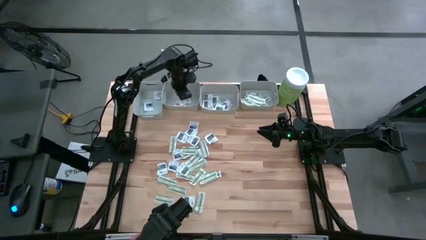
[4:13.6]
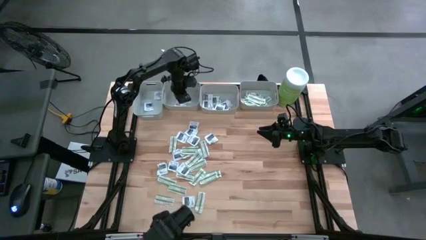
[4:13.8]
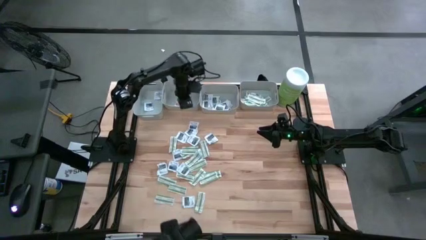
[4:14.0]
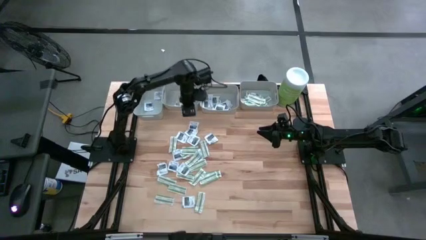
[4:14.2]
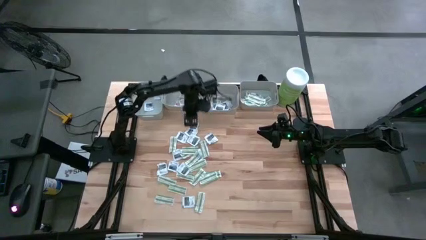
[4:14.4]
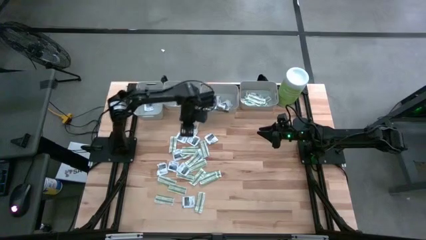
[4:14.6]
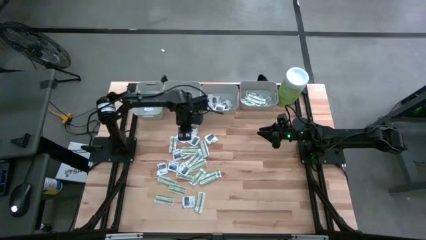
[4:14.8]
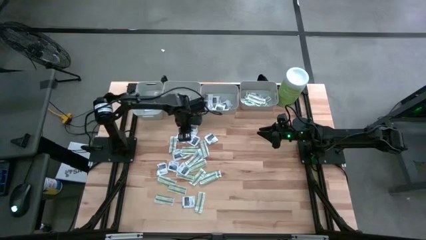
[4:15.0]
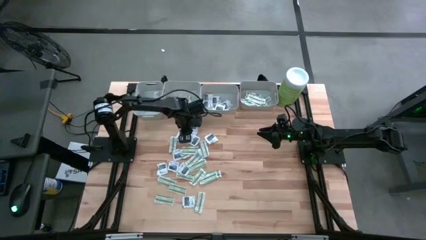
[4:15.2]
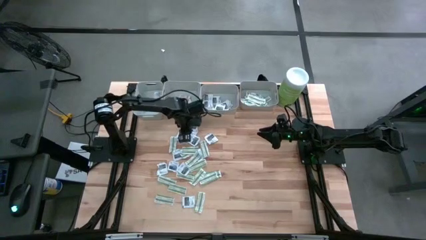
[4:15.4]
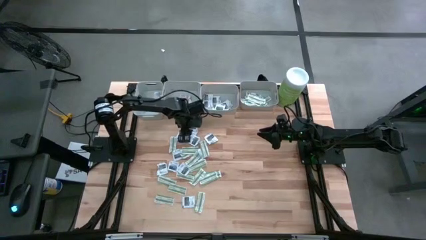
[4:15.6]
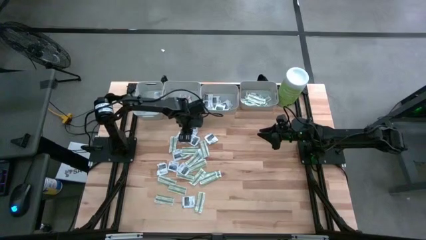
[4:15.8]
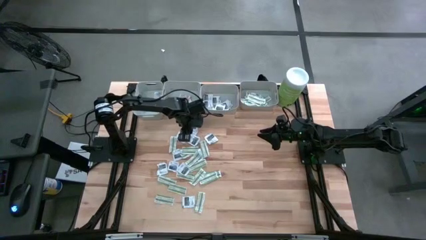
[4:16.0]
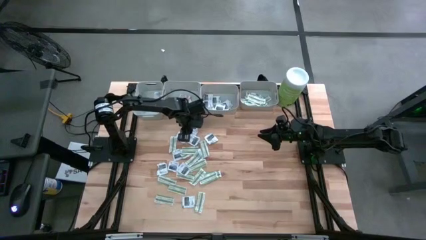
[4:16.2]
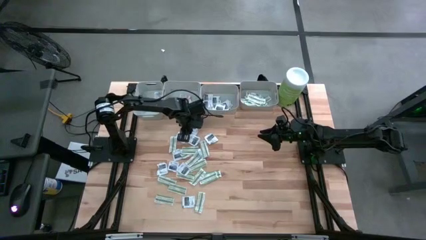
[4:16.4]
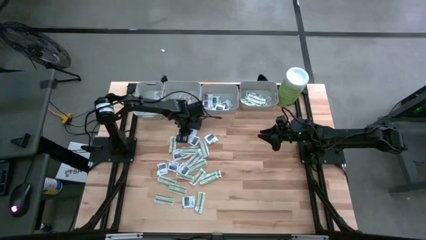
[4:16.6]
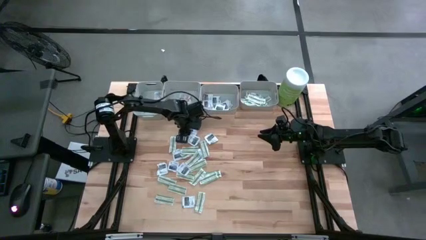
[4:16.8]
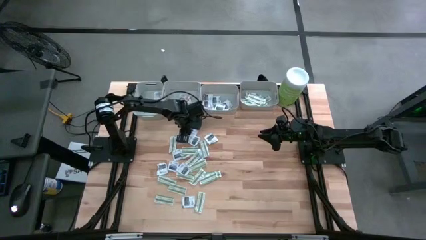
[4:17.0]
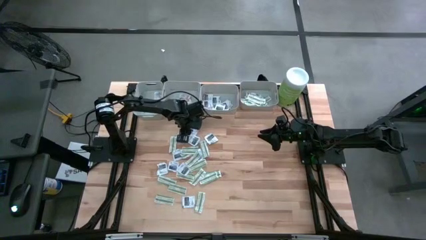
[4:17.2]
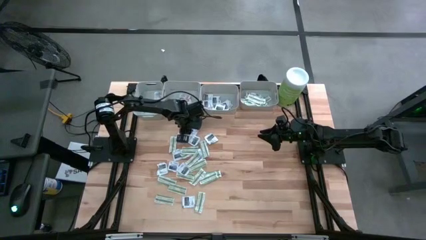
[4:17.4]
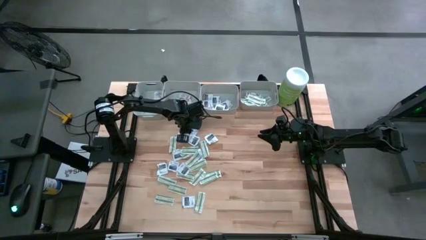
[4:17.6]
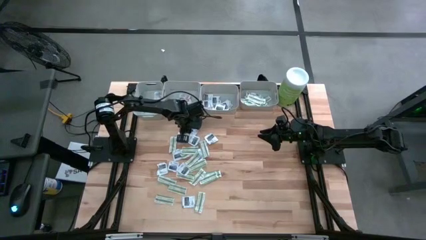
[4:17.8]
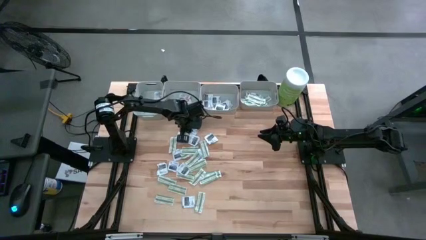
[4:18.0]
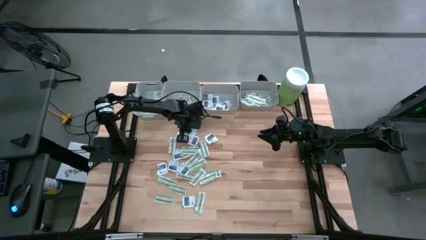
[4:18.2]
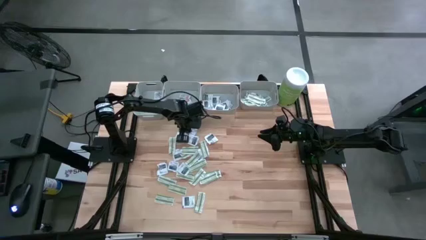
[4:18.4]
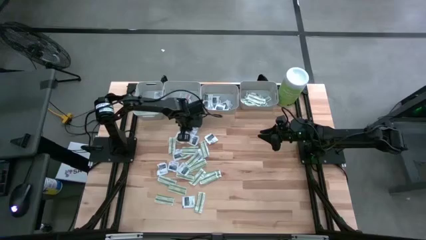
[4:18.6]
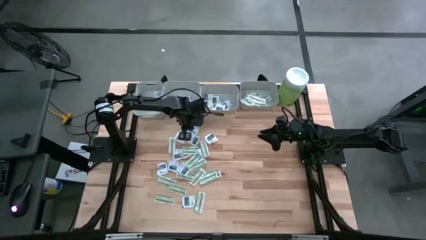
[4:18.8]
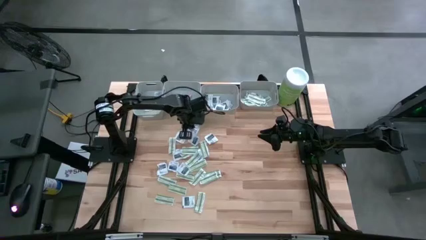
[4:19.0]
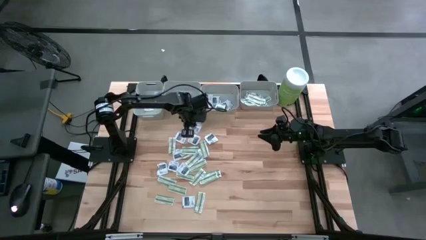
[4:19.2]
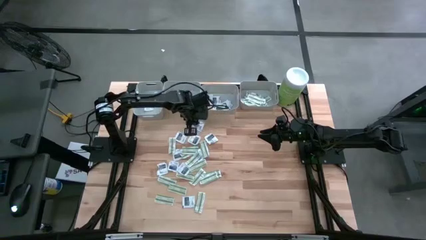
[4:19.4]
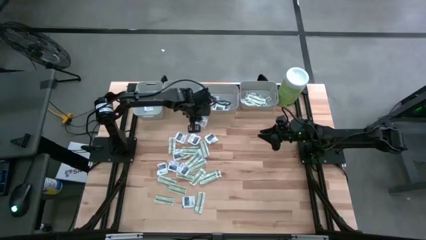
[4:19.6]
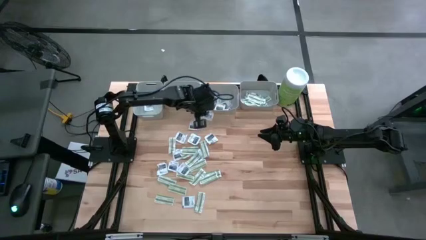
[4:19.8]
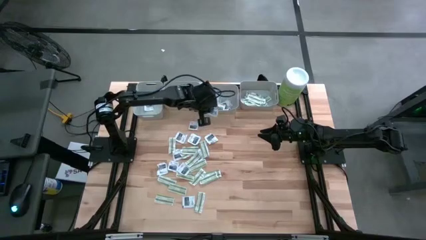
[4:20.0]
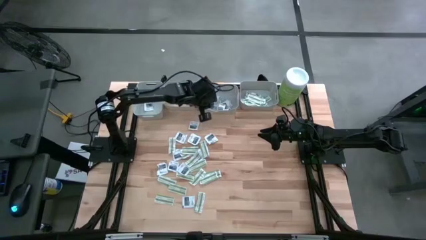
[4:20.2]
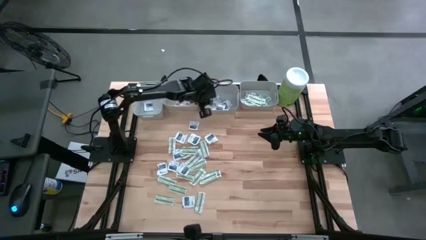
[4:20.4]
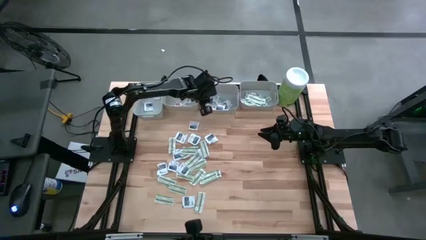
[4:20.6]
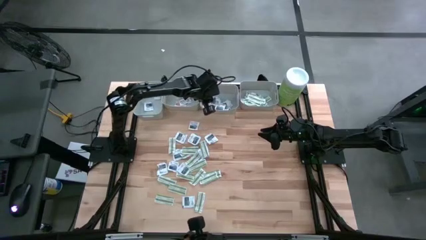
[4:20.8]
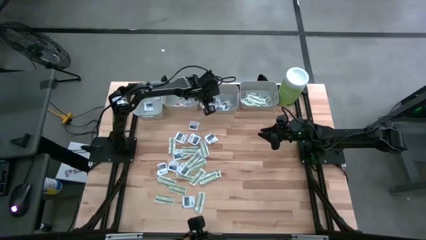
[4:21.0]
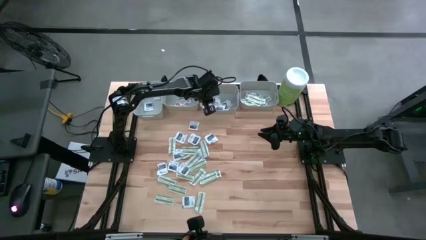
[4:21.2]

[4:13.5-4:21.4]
Task: Pick & Place First Aid Supplies
Put the gray towelette pack into the middle right gray bin

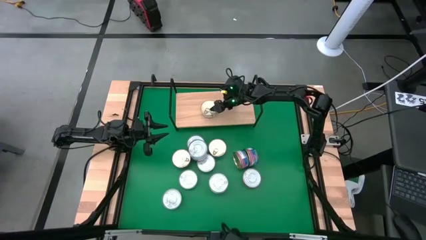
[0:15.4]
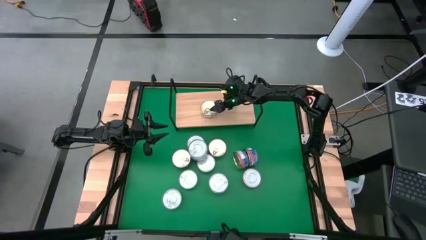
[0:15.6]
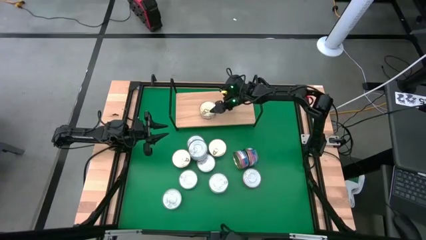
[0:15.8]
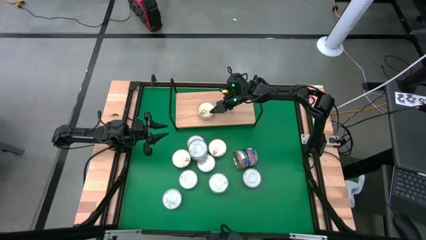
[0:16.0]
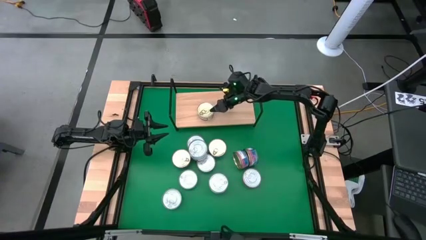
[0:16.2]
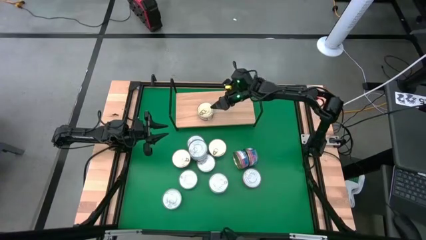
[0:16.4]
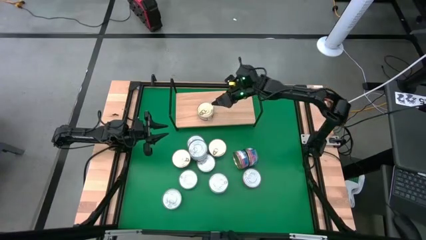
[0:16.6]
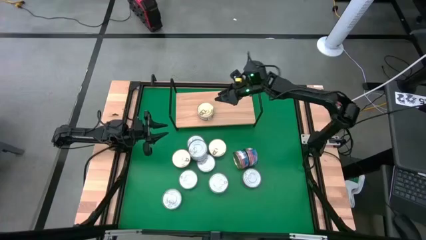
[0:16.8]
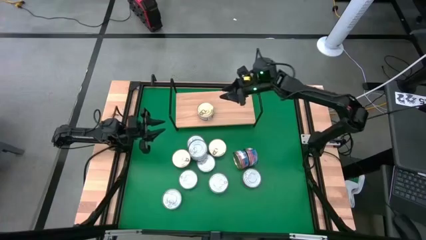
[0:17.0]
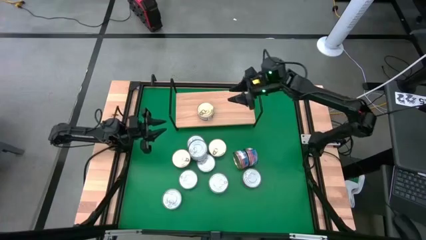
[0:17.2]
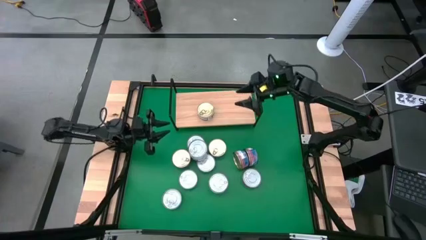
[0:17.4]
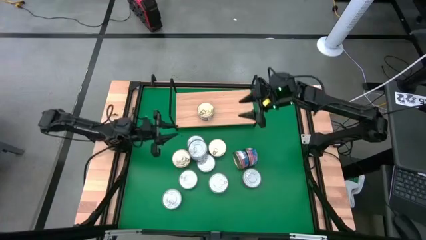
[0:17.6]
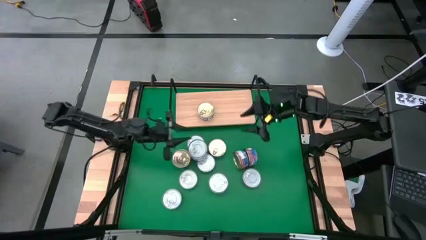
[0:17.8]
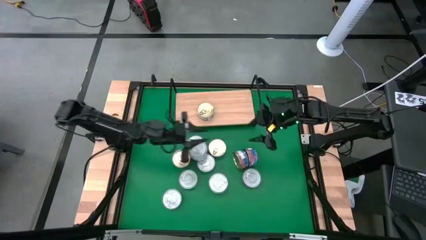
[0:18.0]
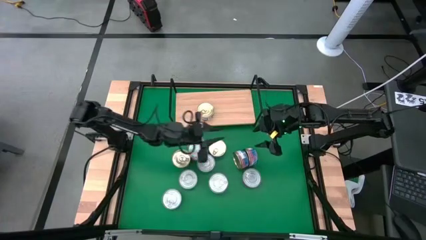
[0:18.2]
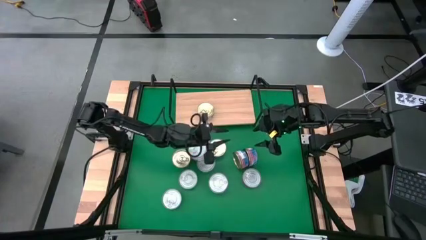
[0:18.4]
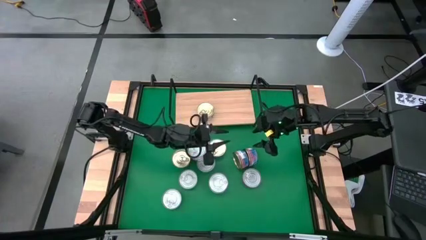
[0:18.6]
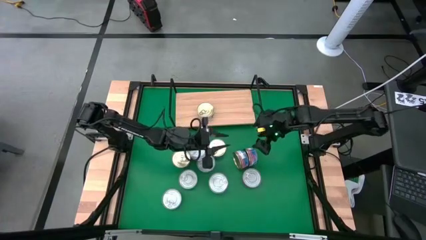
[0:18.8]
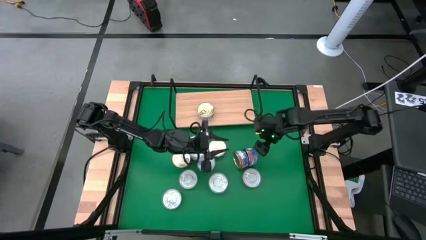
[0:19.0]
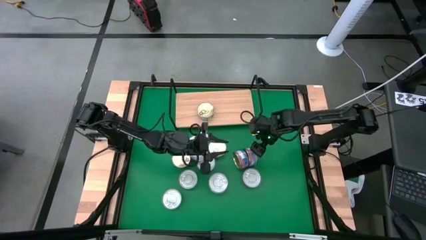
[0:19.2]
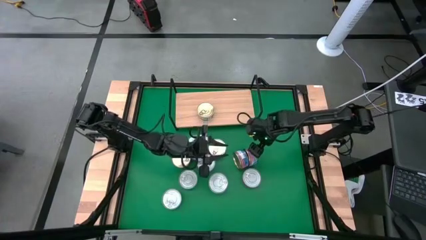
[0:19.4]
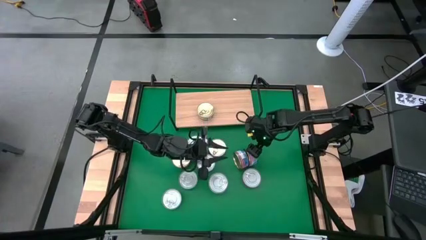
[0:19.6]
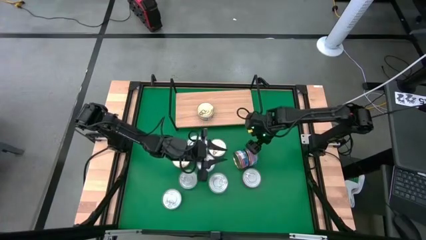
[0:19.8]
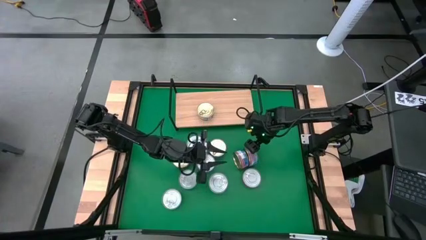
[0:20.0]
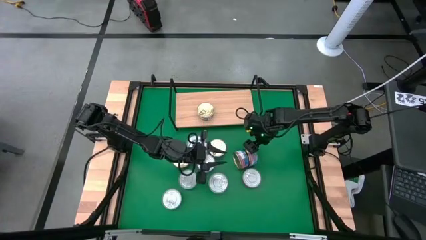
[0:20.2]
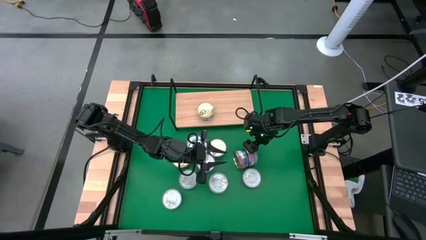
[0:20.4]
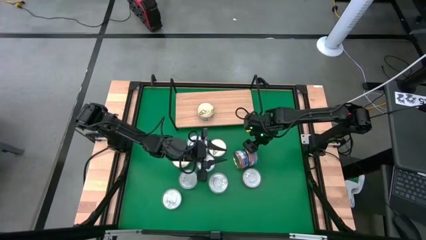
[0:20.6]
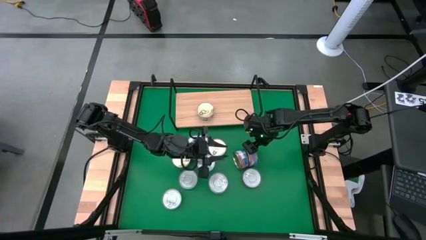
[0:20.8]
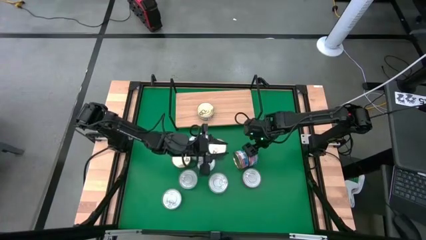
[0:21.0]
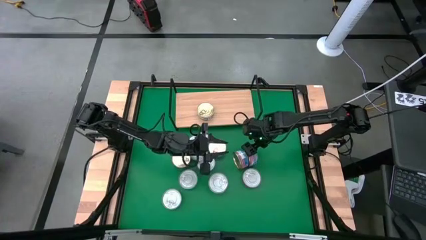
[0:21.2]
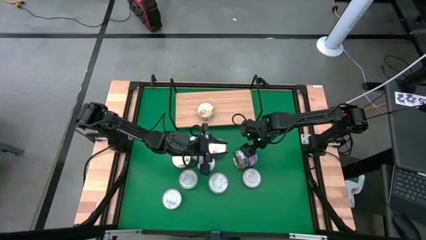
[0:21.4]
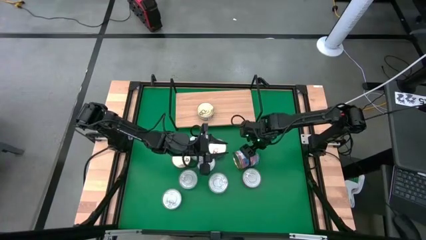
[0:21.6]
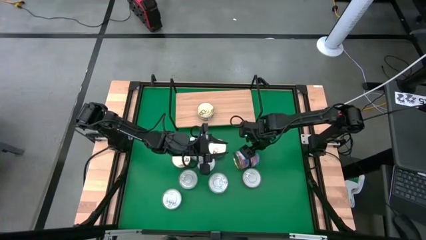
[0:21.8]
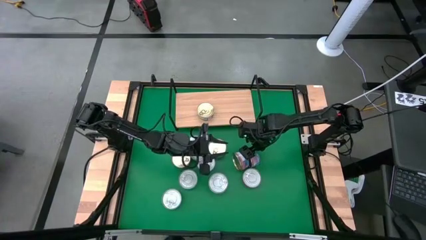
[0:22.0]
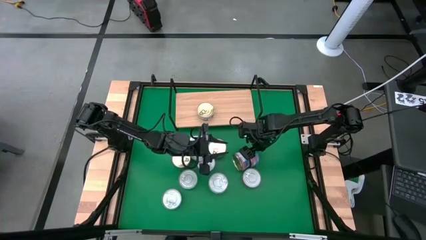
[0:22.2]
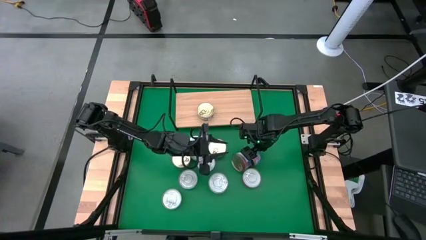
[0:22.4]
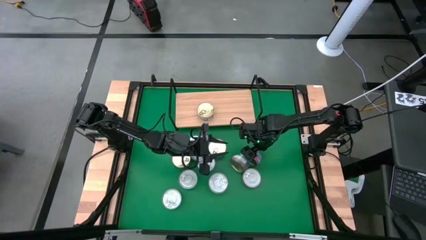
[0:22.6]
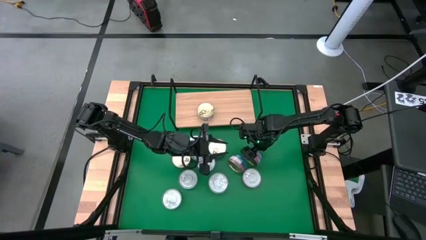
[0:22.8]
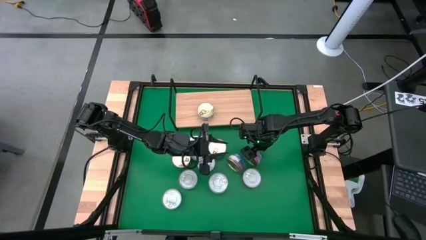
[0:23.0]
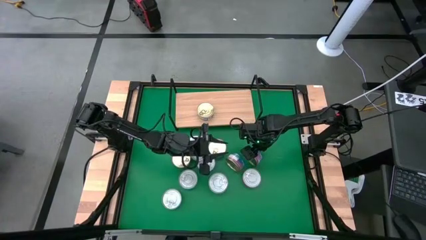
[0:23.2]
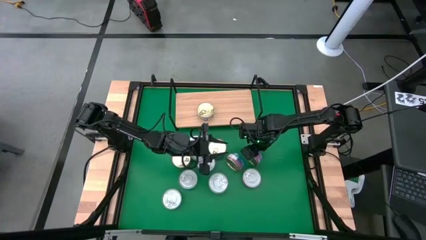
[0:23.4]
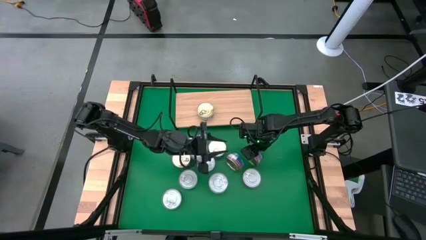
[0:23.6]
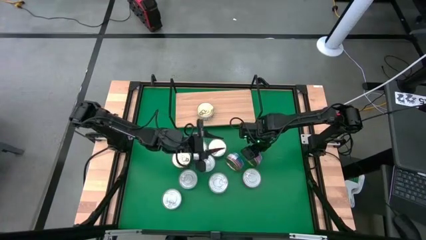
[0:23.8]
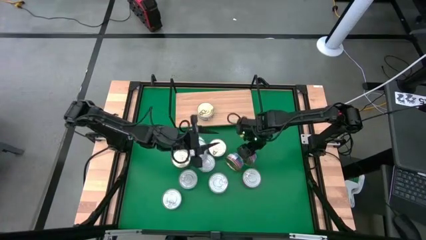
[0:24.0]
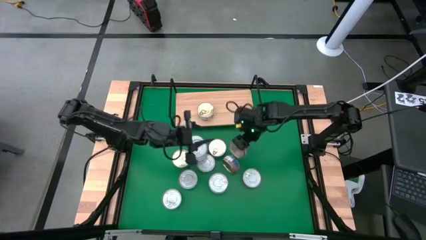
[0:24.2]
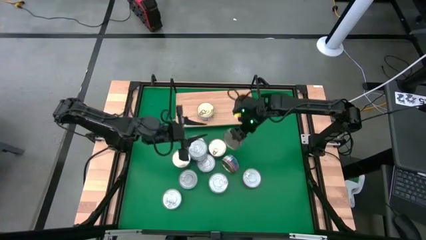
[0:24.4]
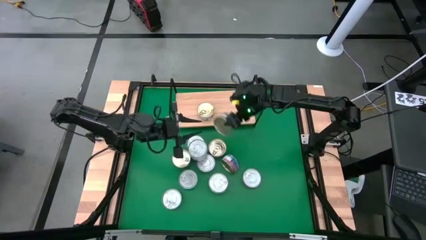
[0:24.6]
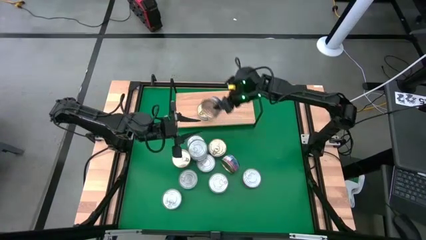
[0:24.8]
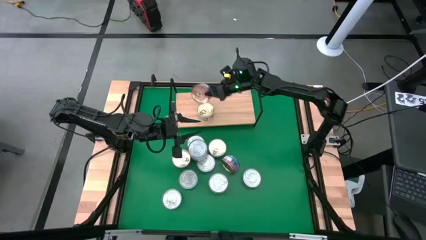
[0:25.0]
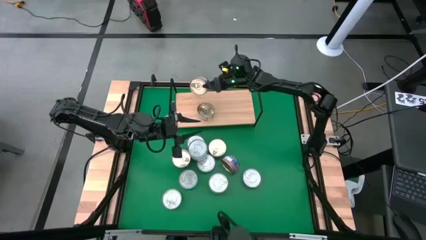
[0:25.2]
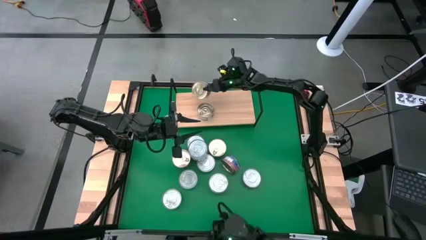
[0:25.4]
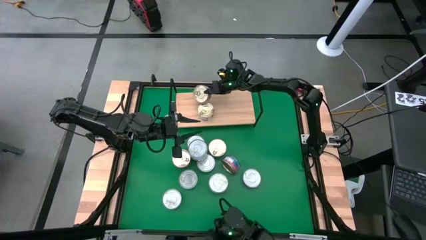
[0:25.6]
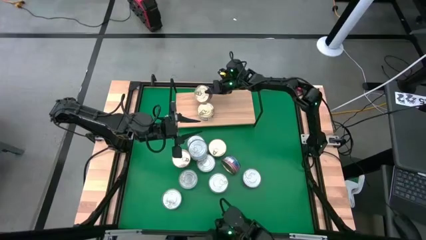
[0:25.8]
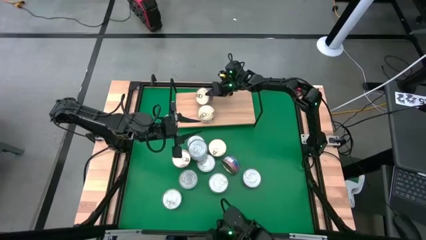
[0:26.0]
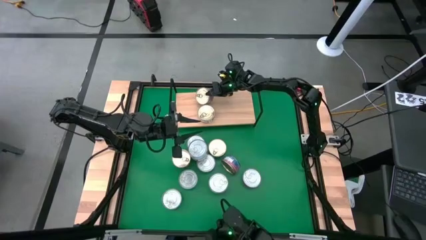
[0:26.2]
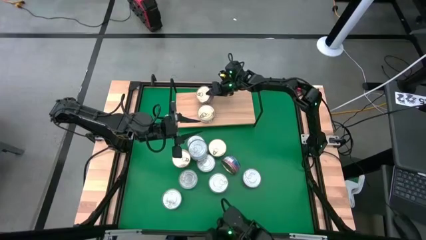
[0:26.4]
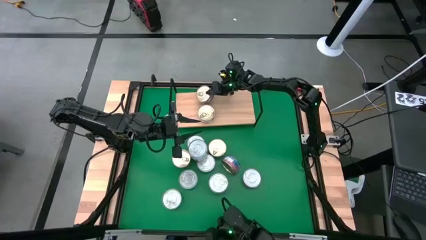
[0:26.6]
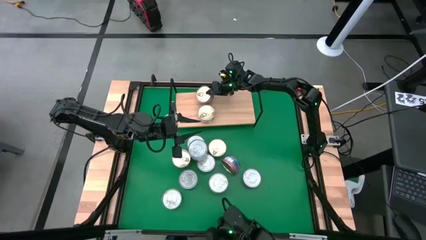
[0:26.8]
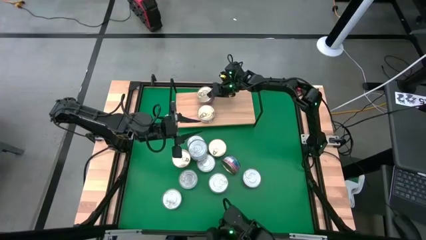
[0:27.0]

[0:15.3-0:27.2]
Task: Stack canned seafood by type on shelf
Put the blue tuna can on the shelf
